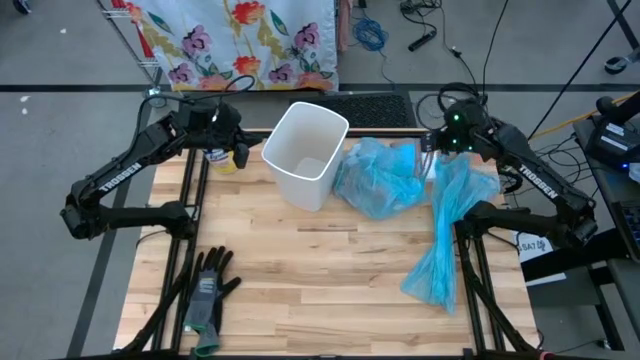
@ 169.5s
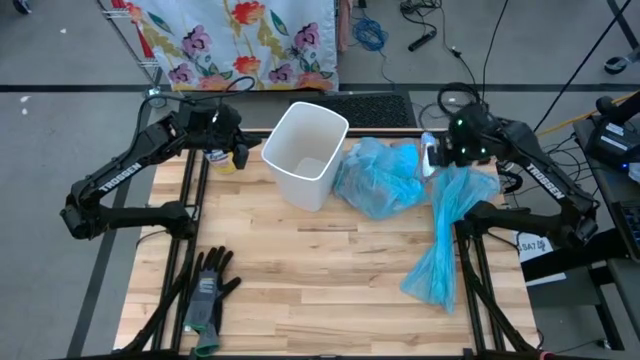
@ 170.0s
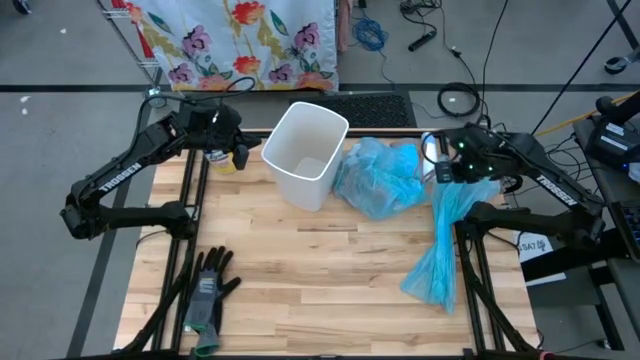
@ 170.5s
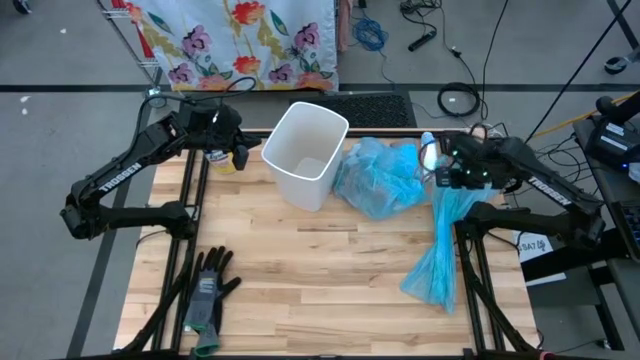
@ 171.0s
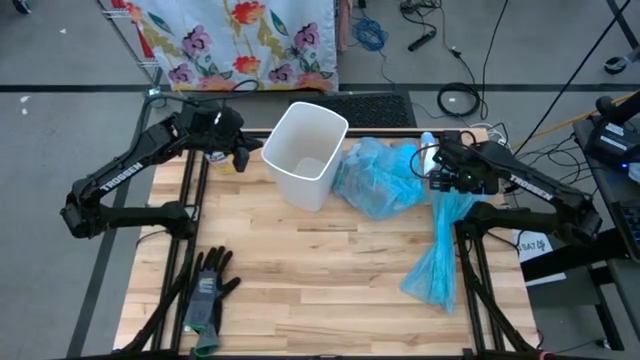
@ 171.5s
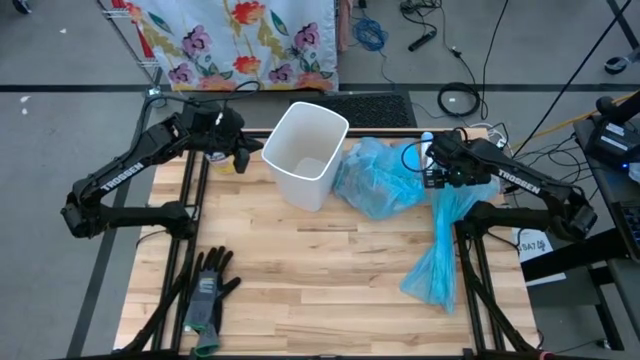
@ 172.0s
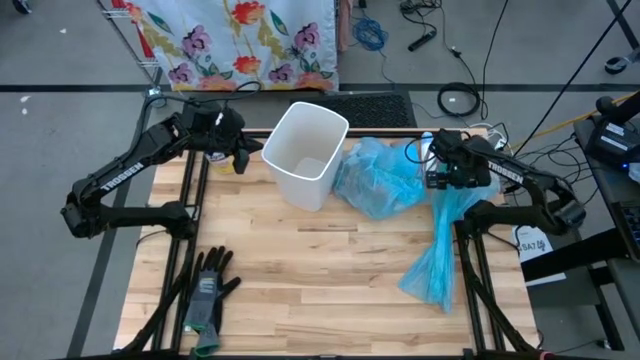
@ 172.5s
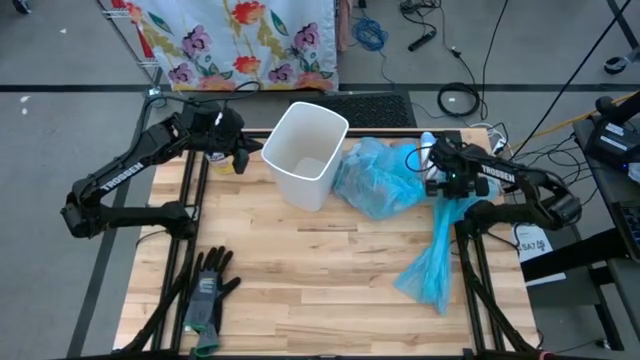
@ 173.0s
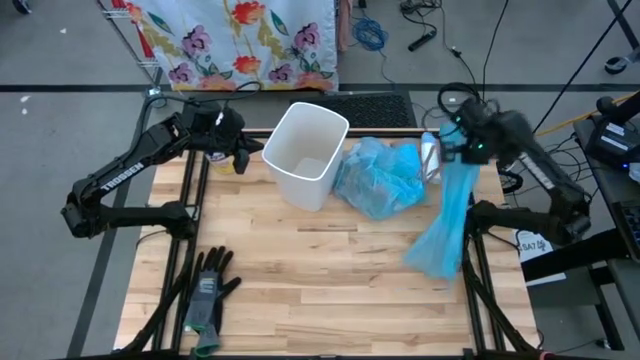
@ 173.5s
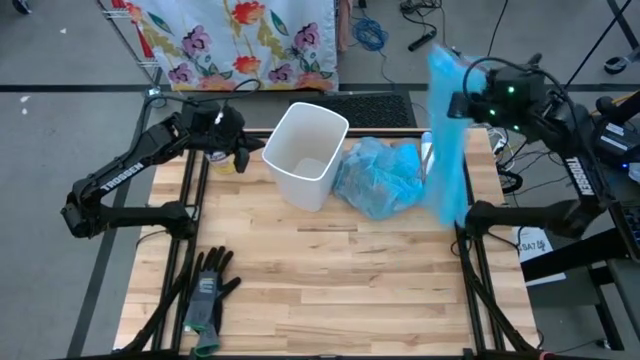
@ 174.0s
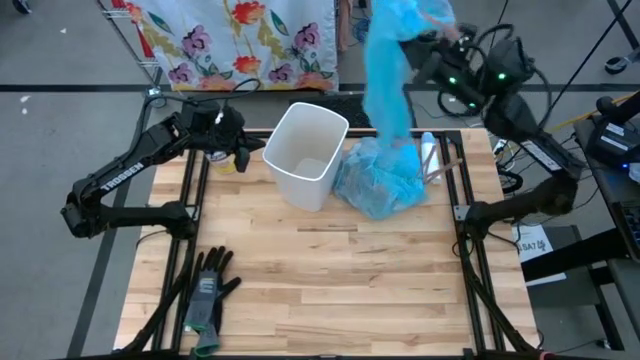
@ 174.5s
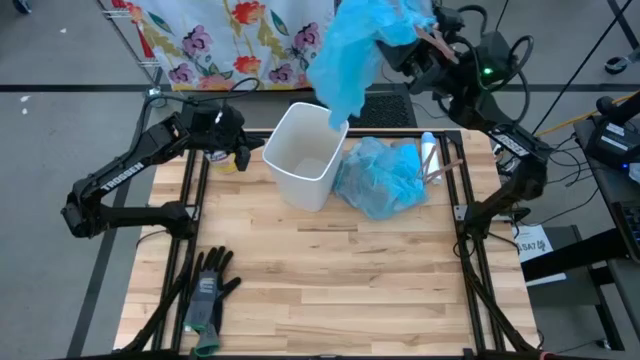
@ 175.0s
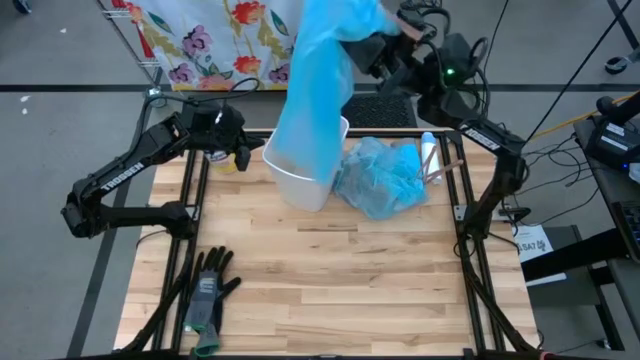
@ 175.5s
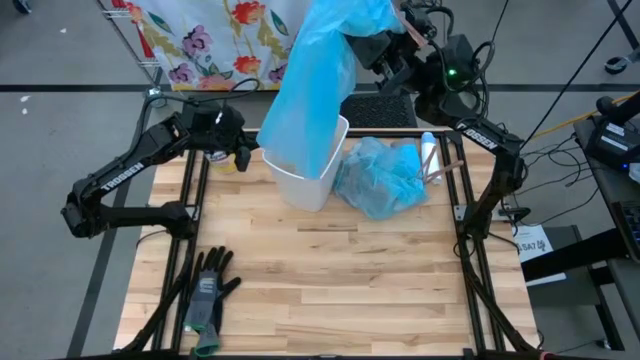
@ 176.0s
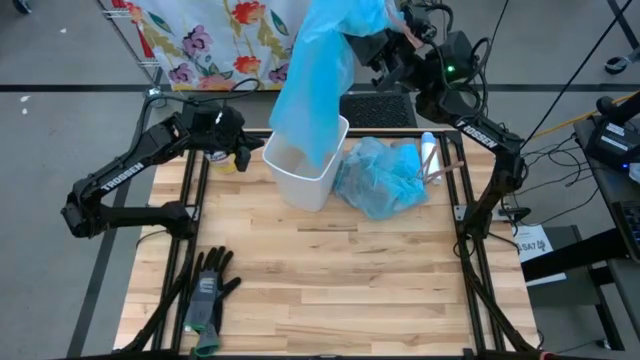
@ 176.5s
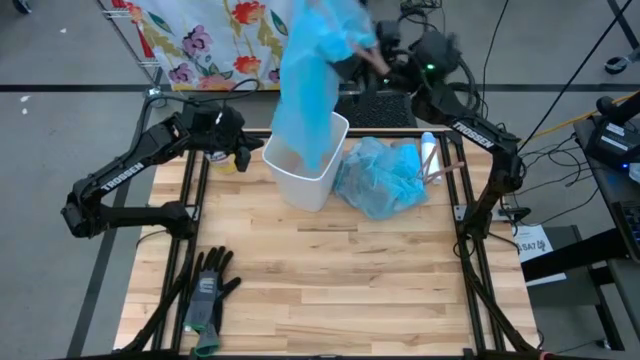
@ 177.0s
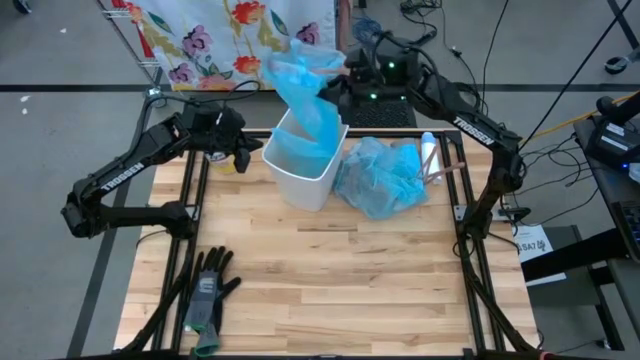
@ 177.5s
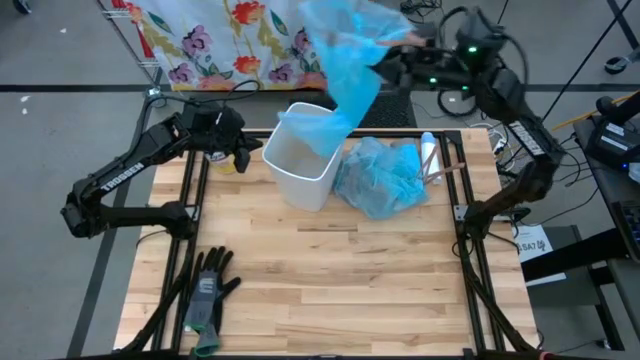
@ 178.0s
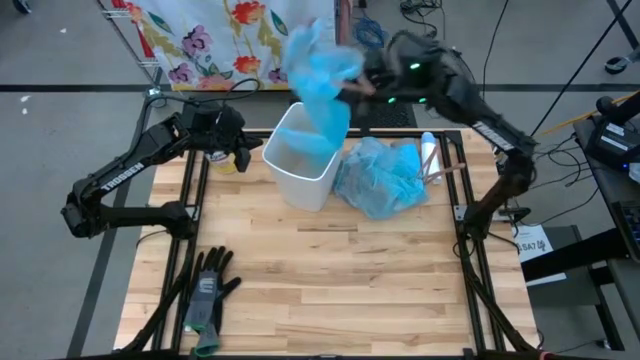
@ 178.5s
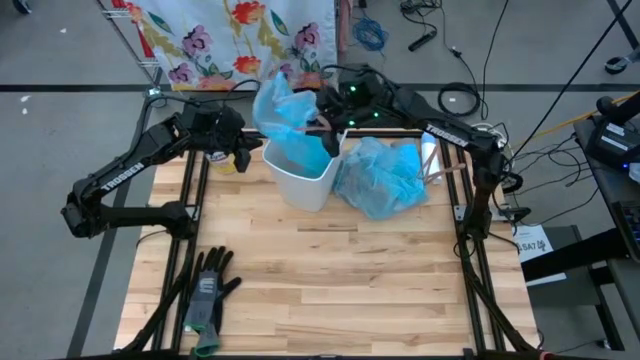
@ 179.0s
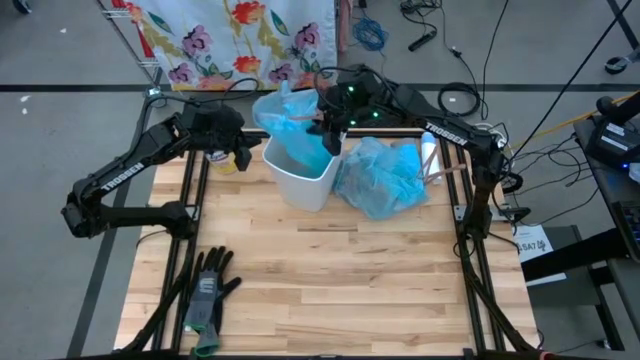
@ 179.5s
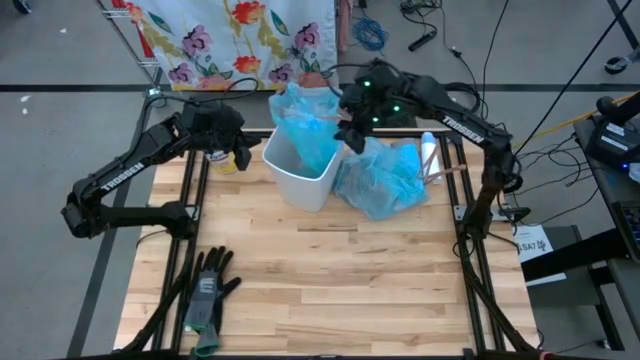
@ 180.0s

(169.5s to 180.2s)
Task: place trash/remove bag and relplace
Insert the new trash bag into the trash bin

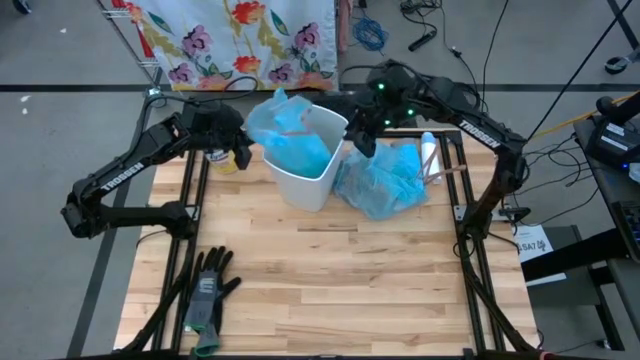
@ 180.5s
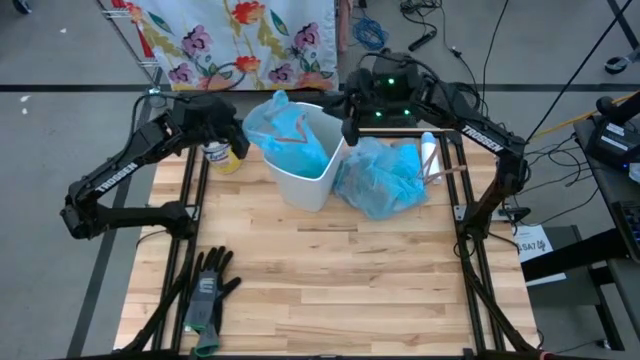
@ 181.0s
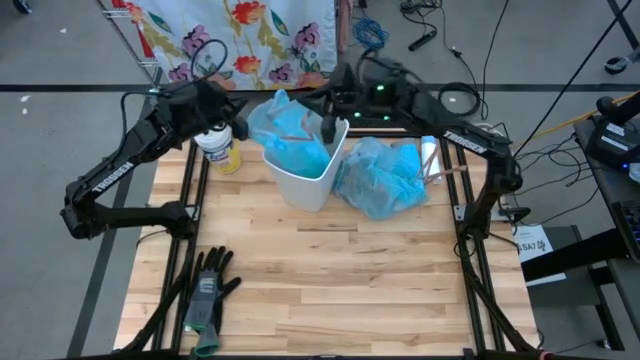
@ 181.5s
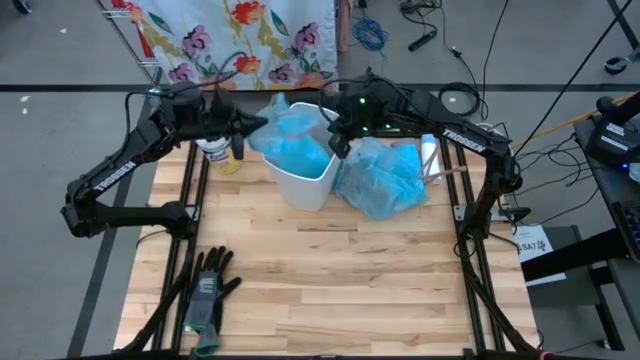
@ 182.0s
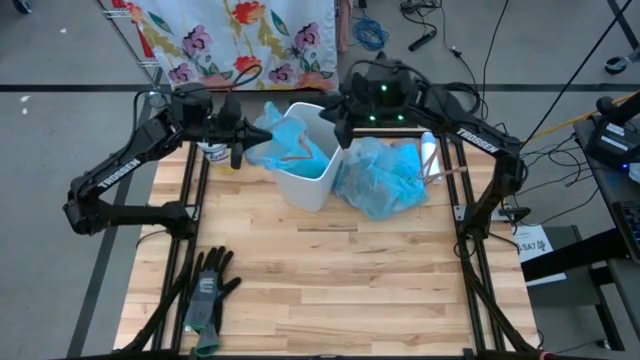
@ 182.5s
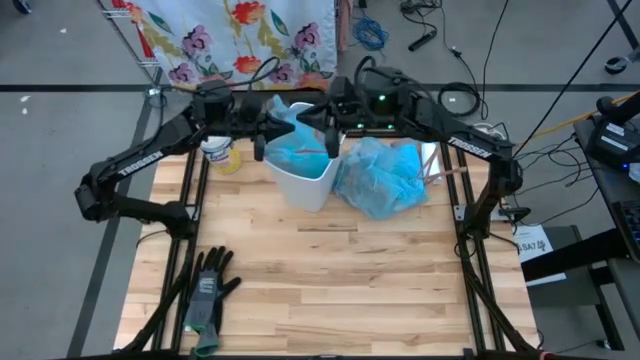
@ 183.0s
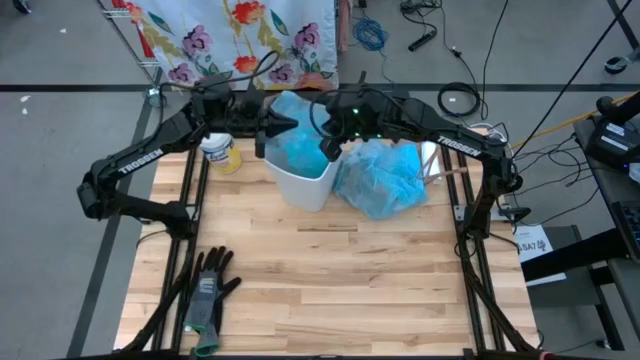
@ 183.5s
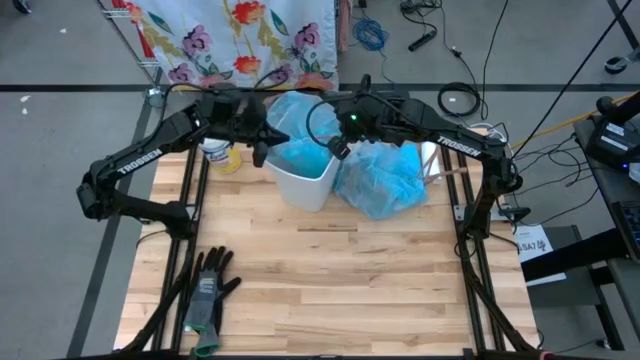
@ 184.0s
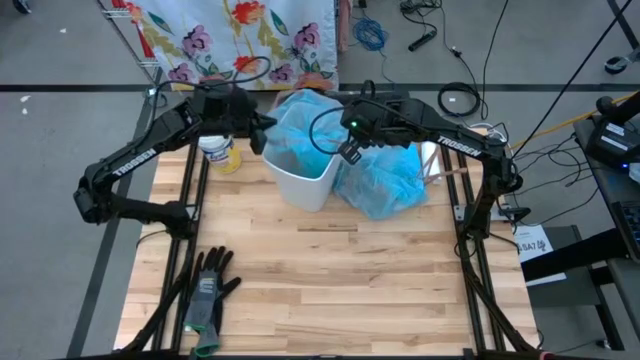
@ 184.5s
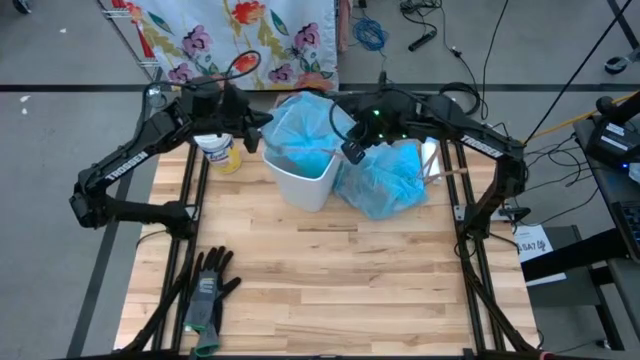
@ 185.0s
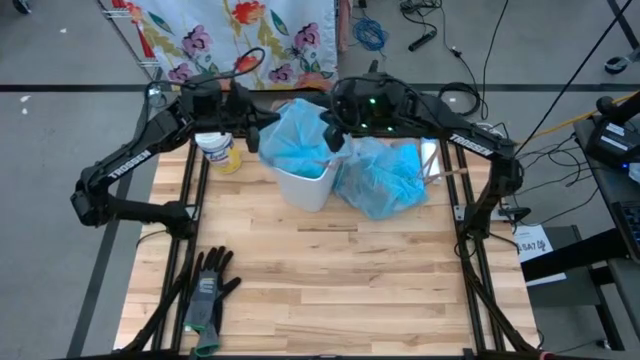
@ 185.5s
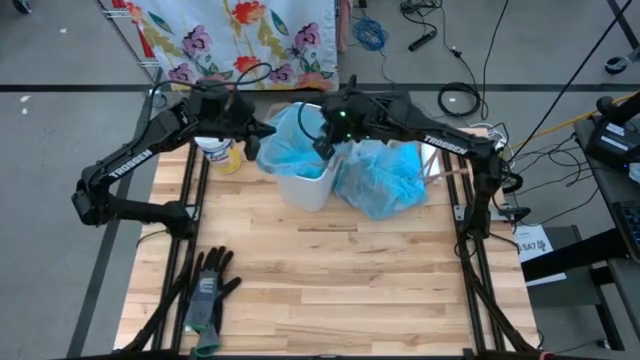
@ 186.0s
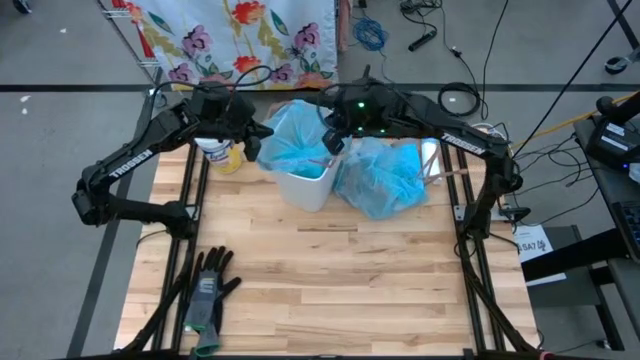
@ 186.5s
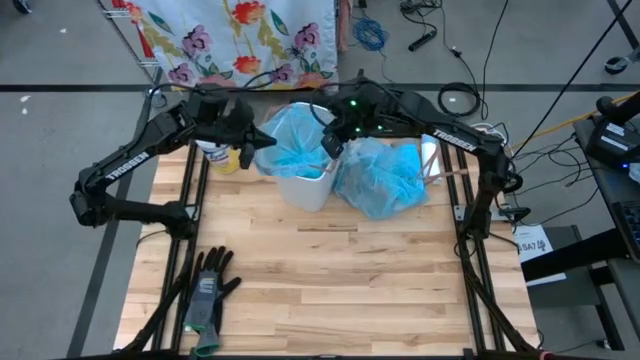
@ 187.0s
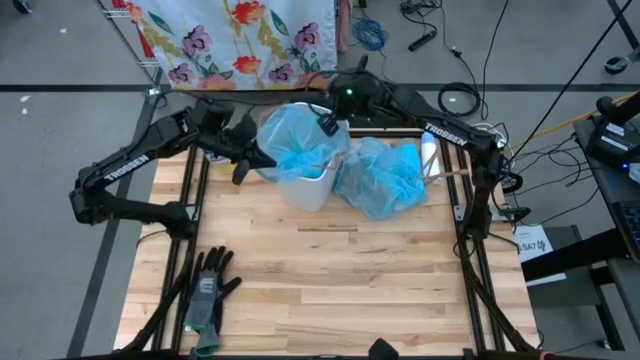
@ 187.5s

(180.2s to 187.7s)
Insert the new trash bag into the trash bin

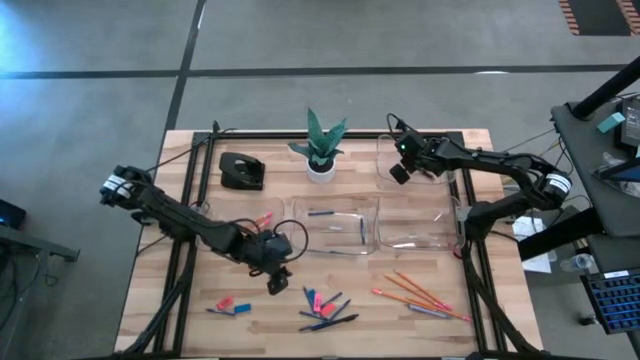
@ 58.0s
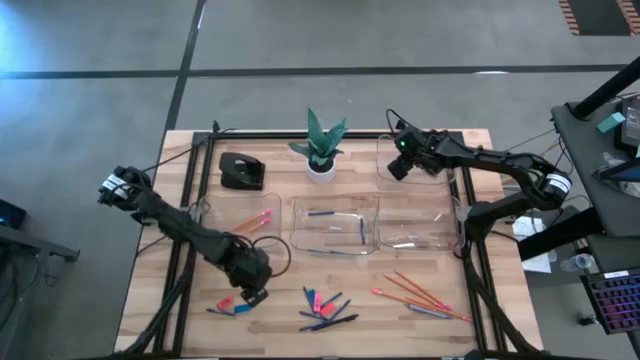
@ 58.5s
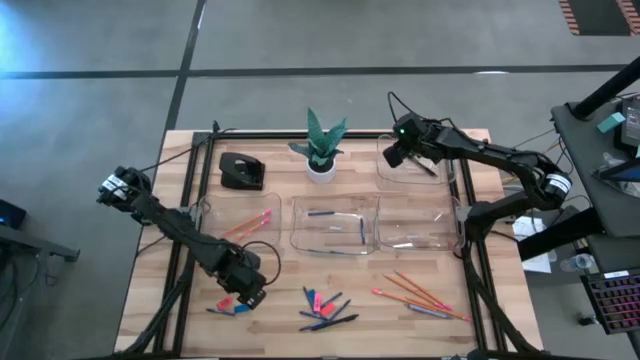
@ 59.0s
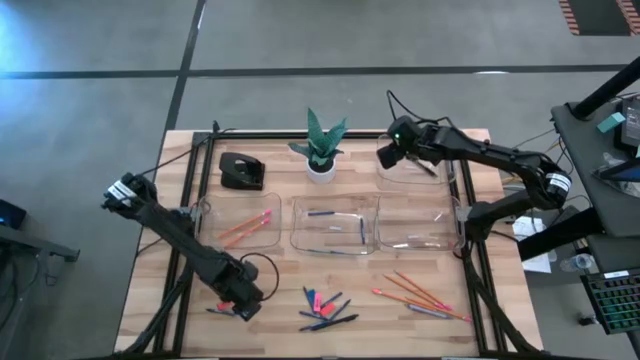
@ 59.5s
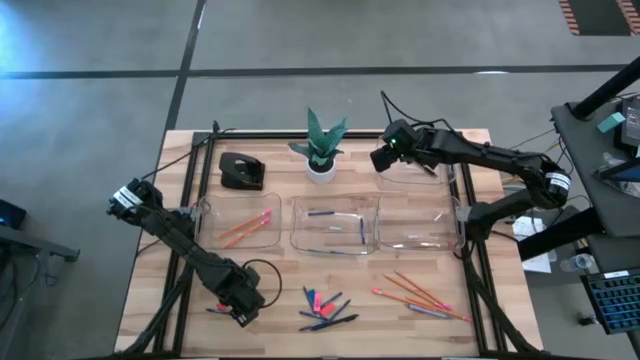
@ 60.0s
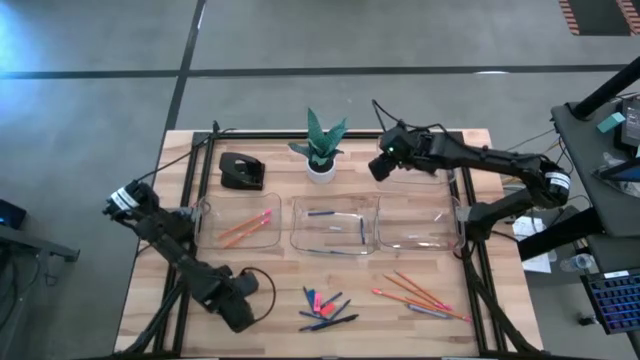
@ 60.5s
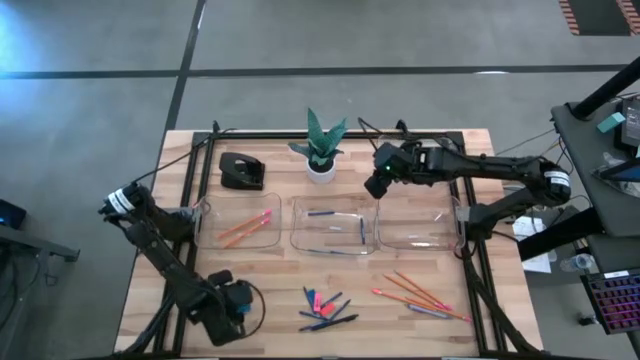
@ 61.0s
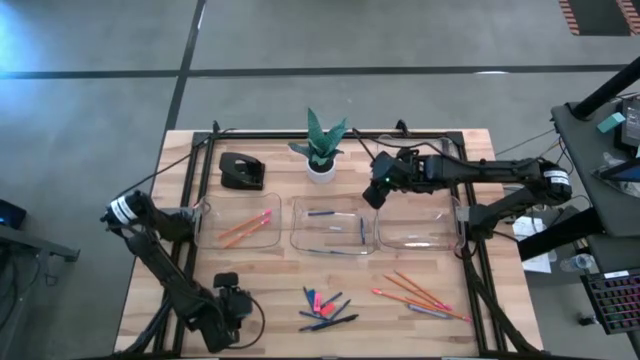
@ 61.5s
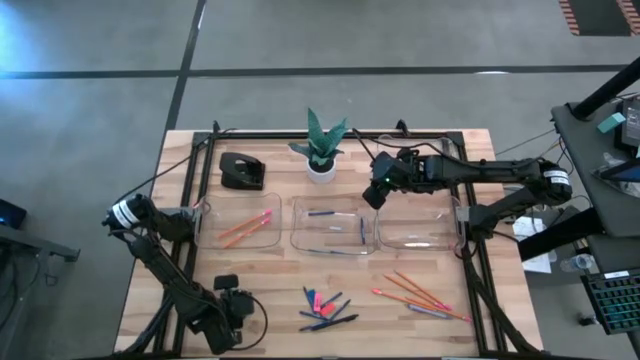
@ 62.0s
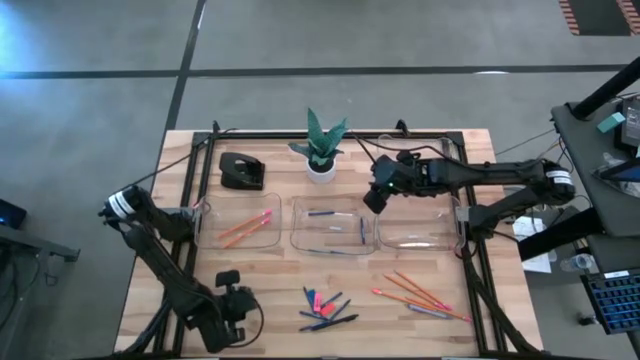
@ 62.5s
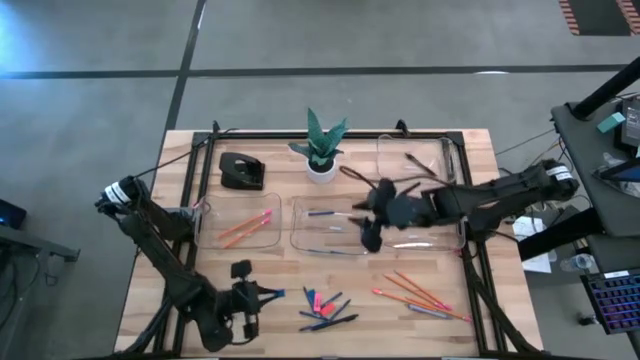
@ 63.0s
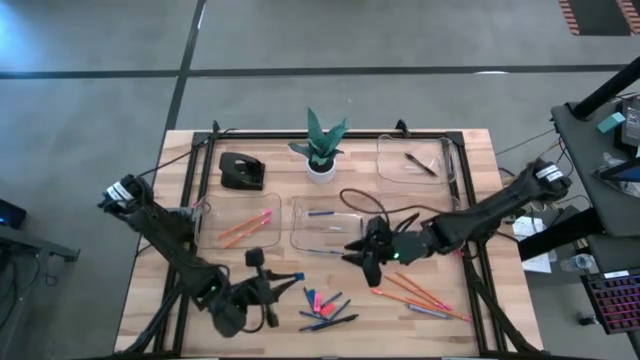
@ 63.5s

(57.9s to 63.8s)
Task: Sort crayons/erasers/pens/pencils in bins
Put the blue eraser into the middle right transparent bin
